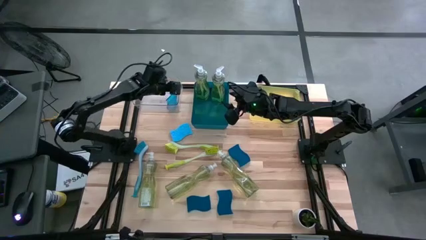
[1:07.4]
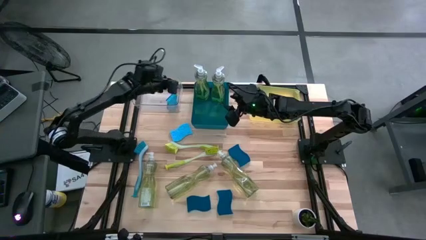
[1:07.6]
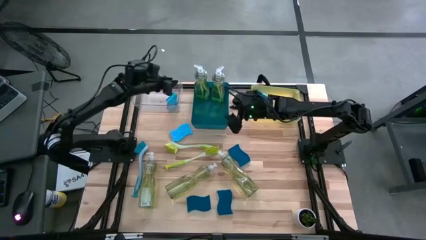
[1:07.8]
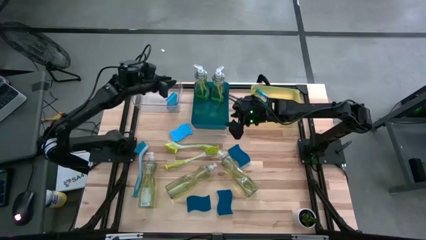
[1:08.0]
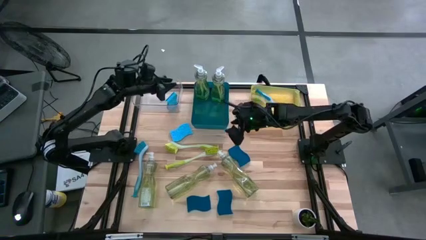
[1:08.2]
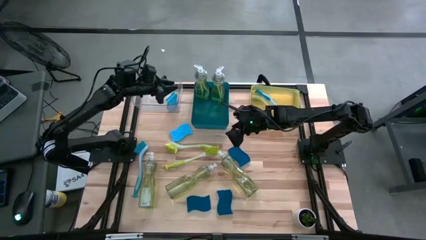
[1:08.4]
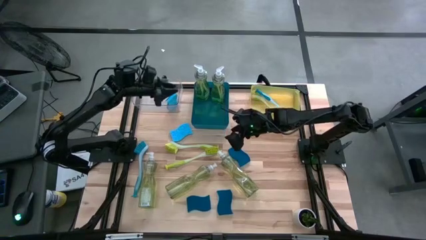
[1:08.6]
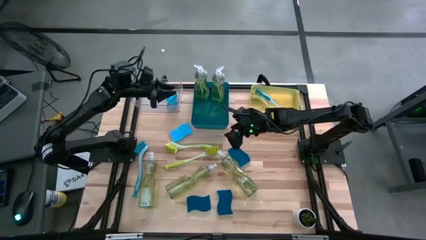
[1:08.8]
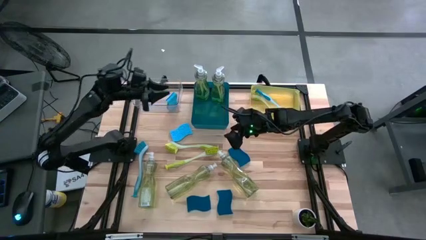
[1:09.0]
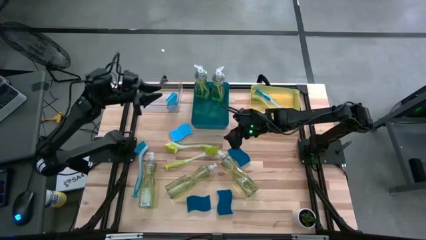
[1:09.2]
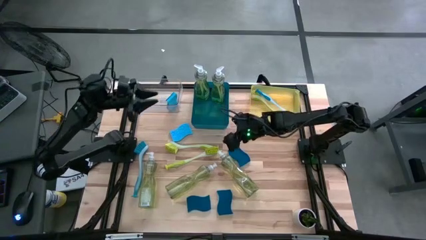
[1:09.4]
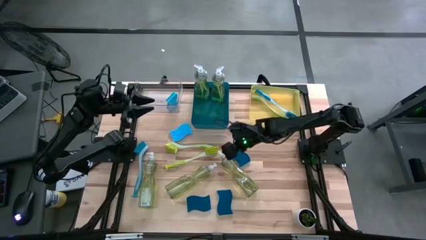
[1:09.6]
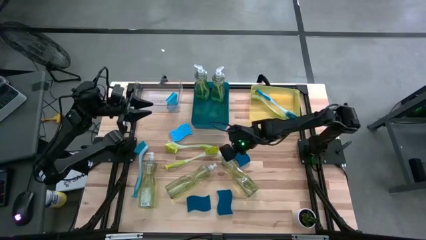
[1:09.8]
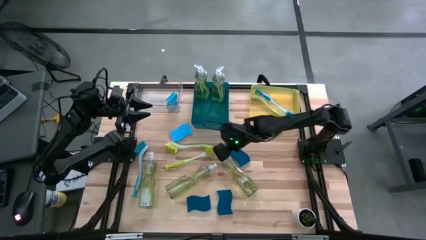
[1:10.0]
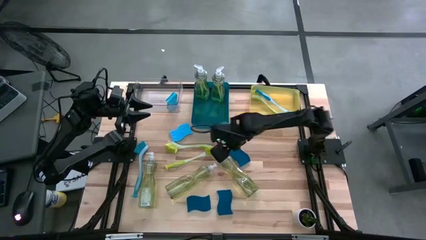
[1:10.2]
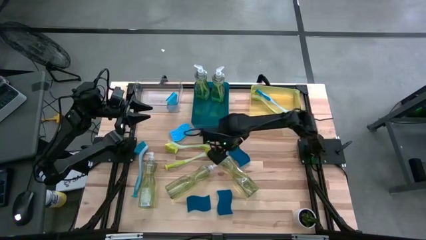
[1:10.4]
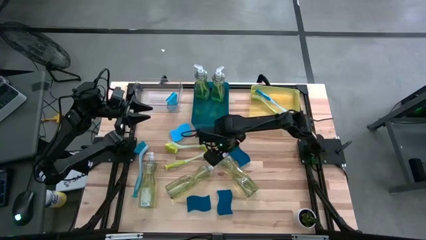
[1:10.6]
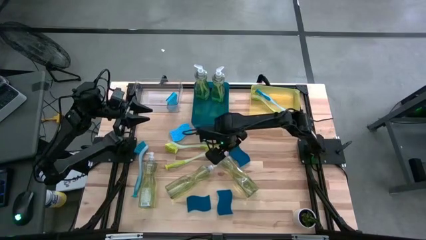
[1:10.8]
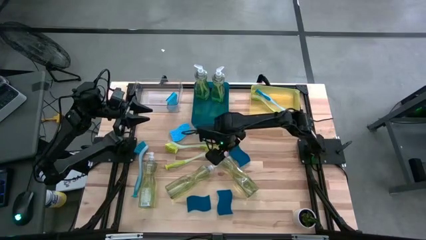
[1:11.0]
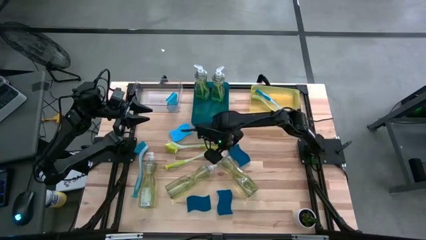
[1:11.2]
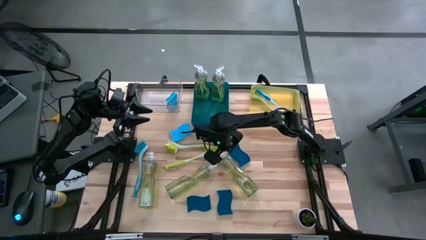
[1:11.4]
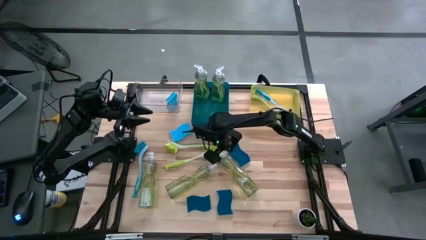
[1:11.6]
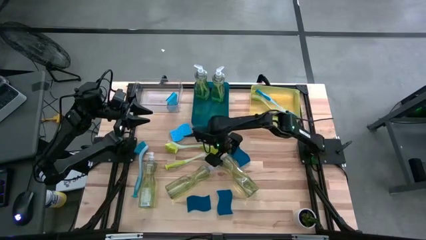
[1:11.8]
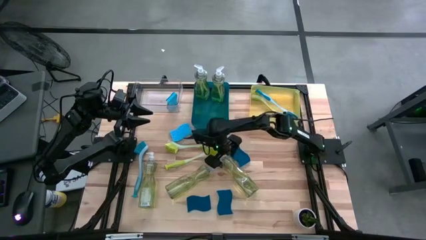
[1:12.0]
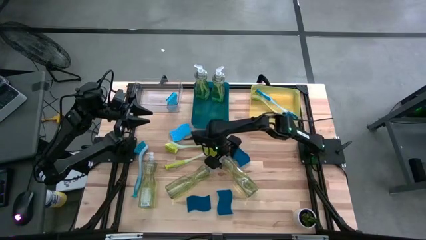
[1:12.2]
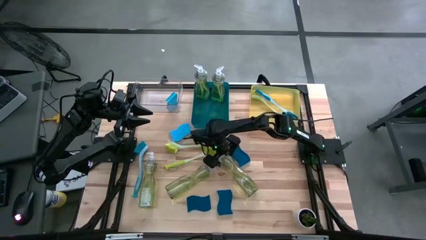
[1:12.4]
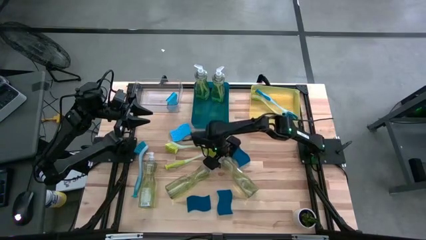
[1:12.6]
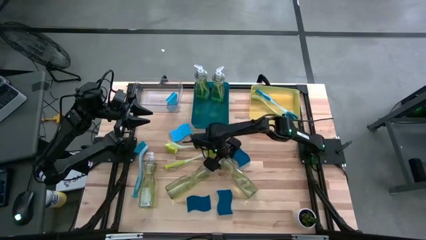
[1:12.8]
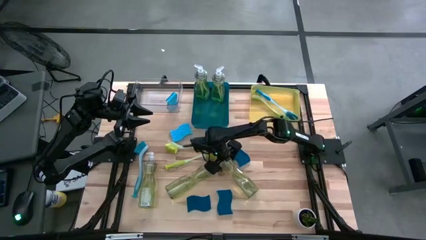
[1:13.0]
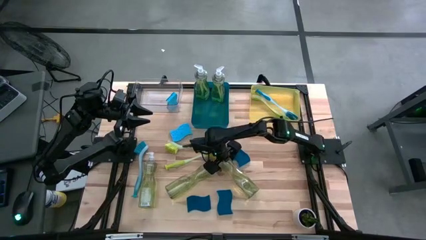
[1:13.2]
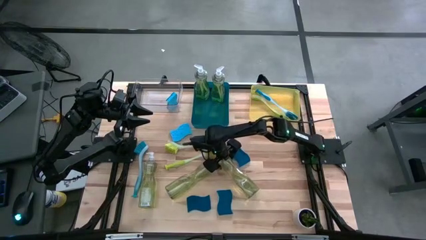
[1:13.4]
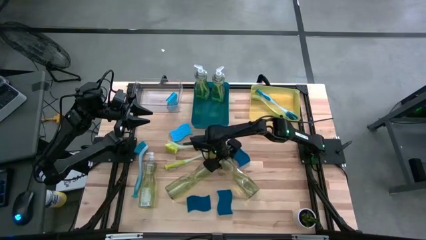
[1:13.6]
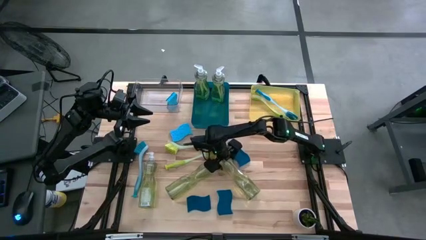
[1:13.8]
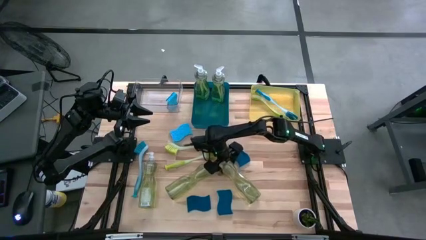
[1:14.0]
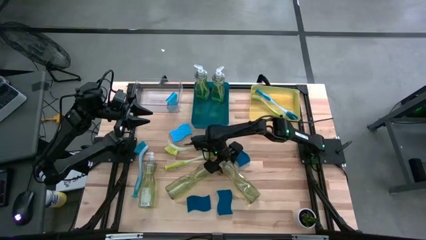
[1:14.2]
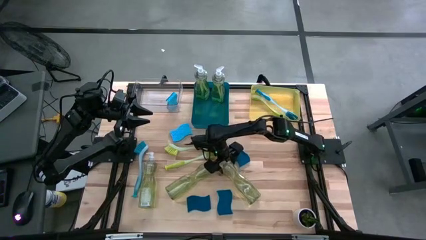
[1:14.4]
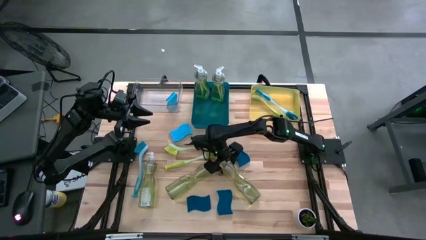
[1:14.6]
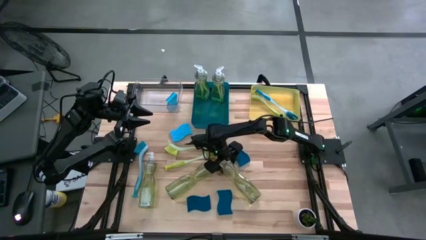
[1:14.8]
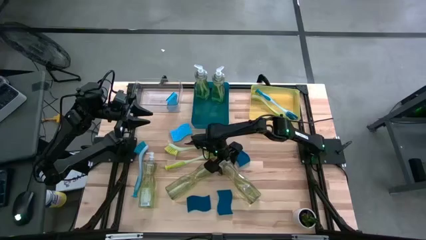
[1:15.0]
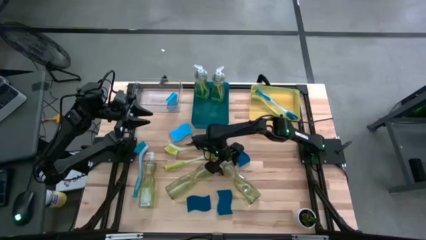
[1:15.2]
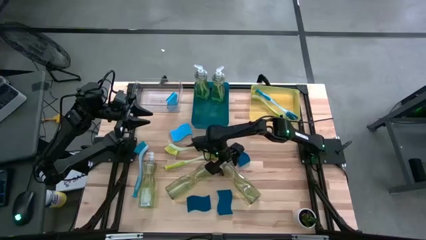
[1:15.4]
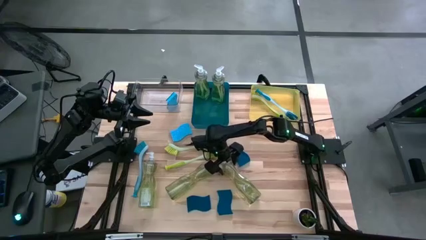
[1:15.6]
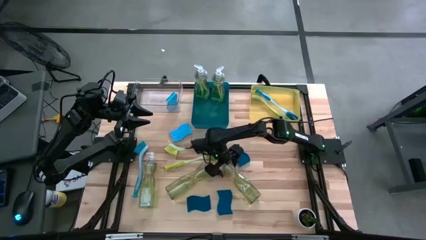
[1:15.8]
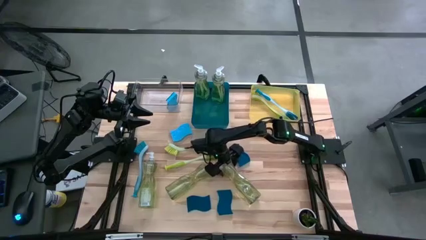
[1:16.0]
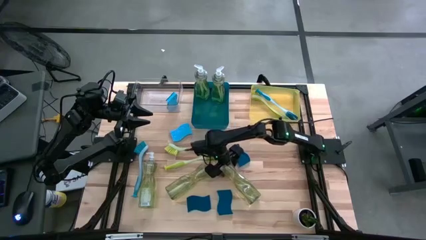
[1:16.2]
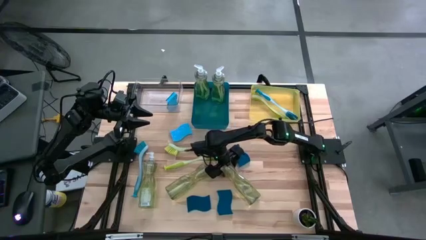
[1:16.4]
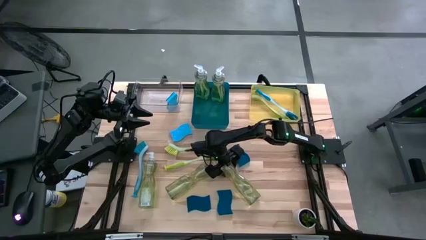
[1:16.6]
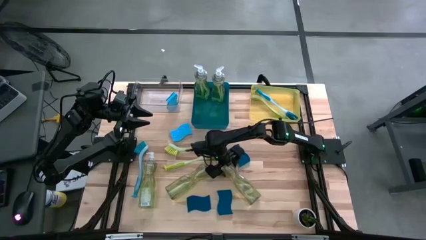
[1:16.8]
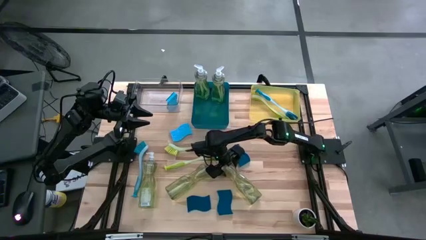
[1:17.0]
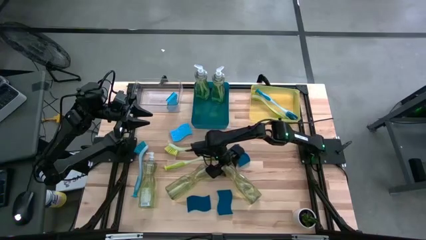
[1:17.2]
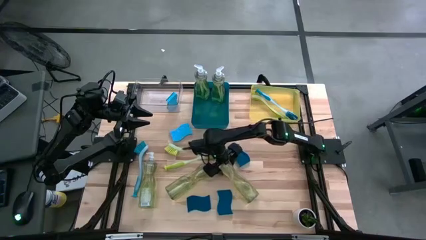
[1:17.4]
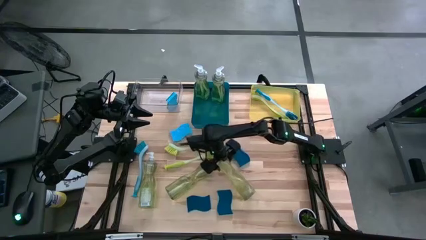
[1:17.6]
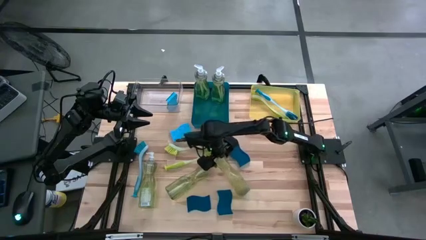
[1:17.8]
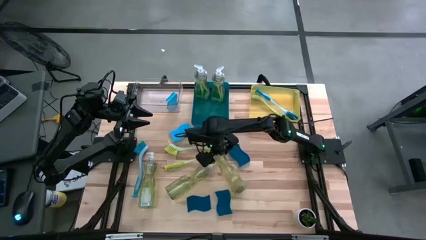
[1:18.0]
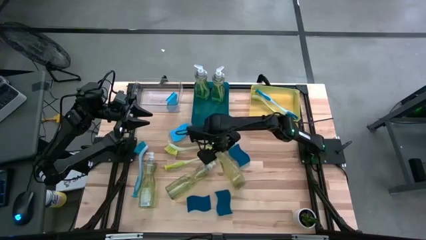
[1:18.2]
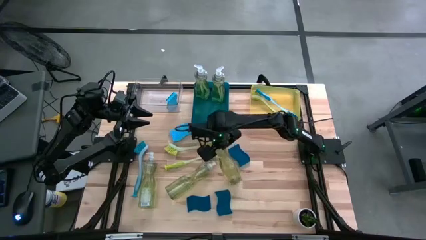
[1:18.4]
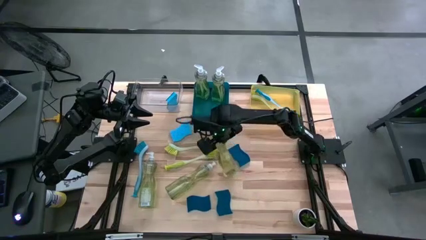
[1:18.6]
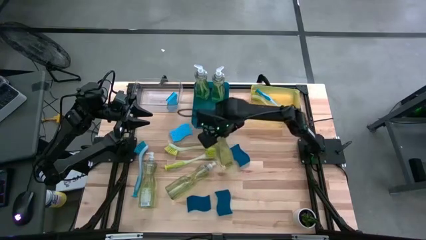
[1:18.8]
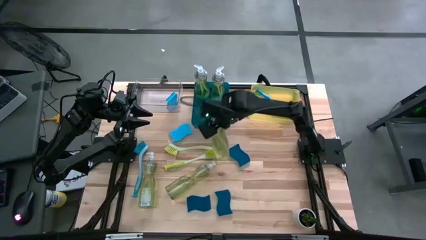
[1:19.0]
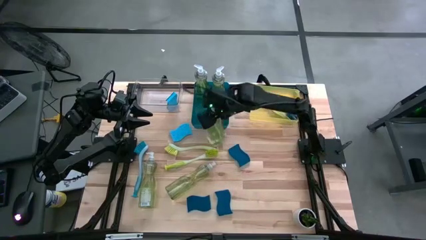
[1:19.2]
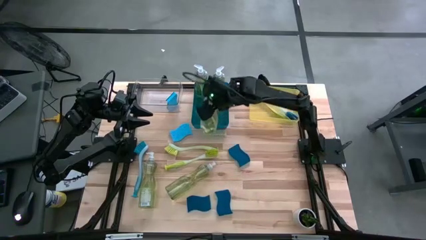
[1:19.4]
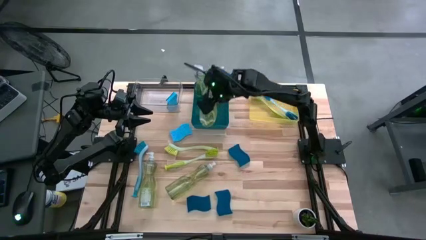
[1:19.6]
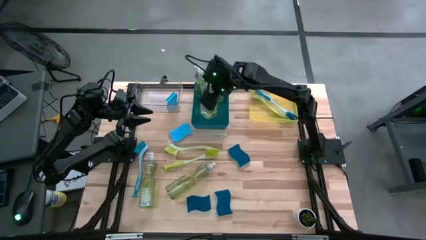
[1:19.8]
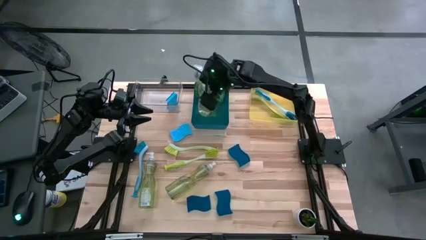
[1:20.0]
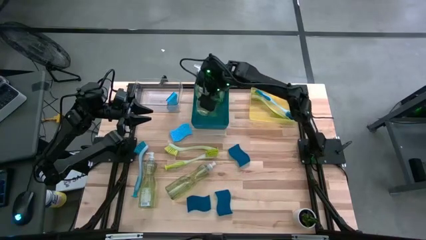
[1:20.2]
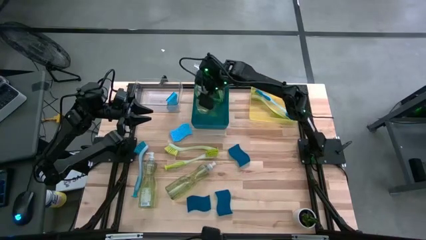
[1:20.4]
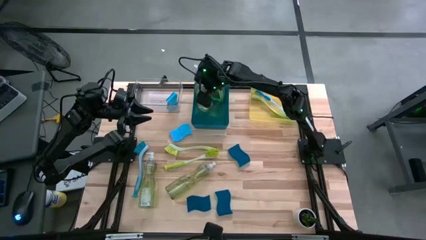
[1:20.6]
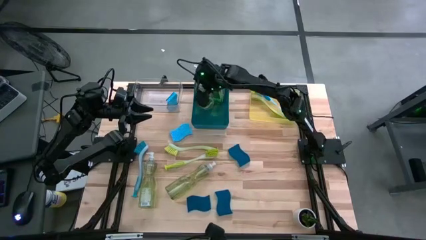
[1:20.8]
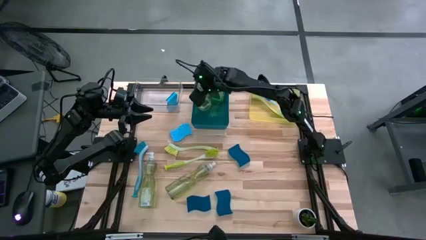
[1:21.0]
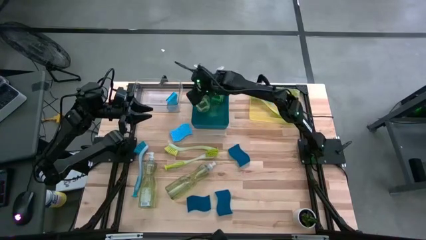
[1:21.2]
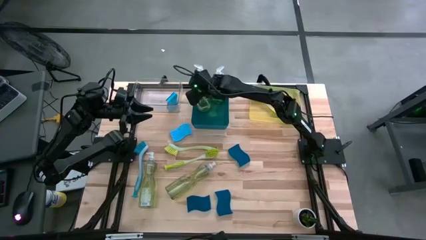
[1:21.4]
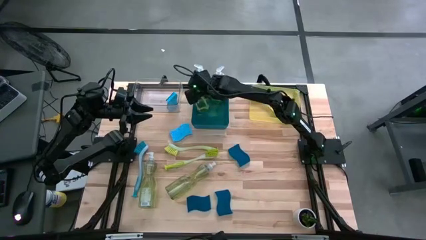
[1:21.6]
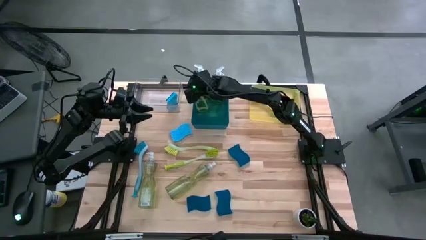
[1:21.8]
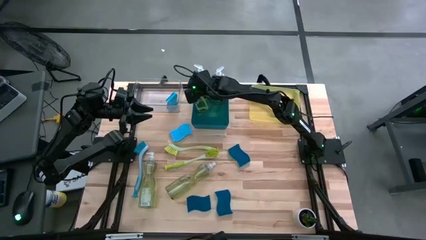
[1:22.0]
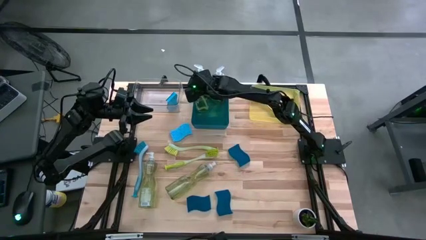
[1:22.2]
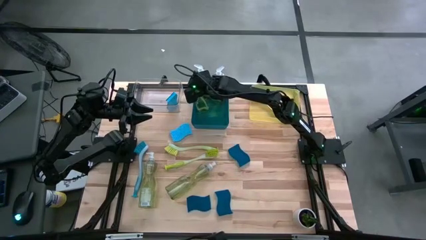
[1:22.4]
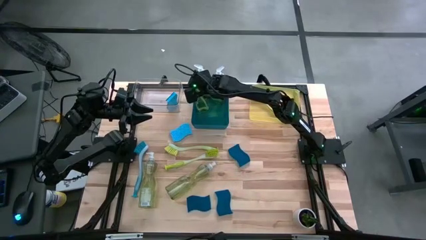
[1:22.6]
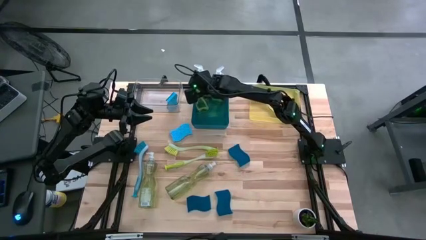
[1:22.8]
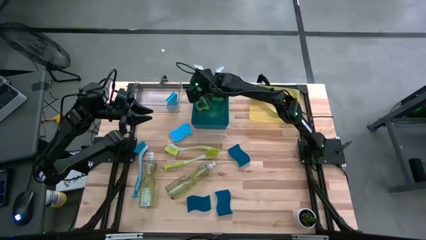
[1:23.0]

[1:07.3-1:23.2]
Task: Pick & Place Kitchen Sink Supplies
Put the yellow soap dispenser into the blue bin
